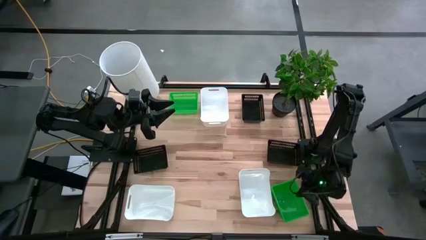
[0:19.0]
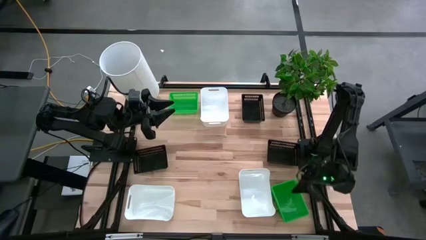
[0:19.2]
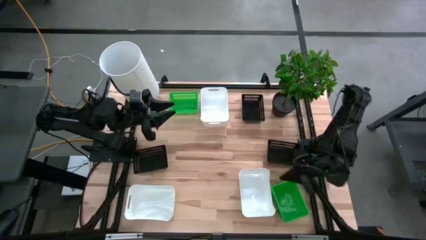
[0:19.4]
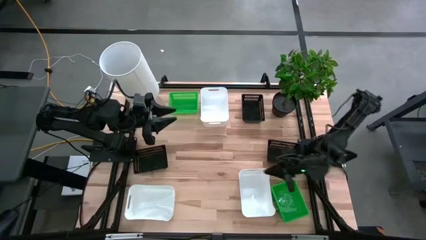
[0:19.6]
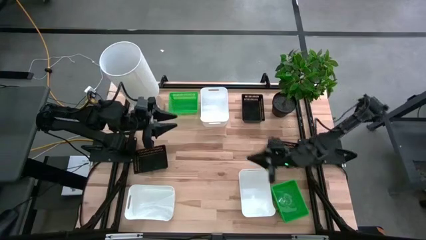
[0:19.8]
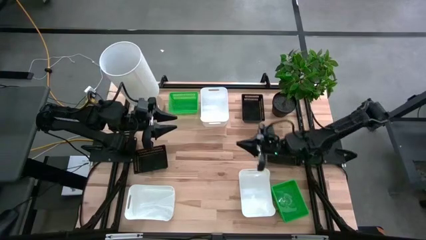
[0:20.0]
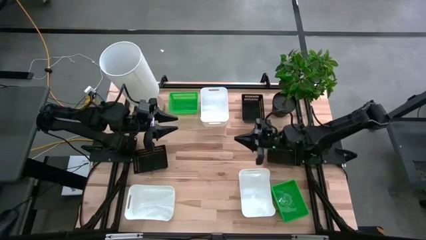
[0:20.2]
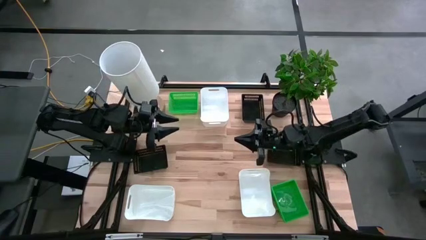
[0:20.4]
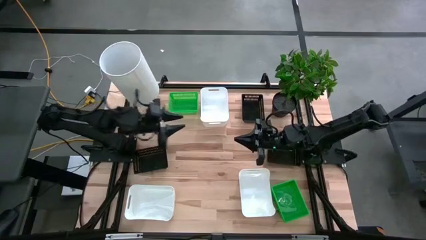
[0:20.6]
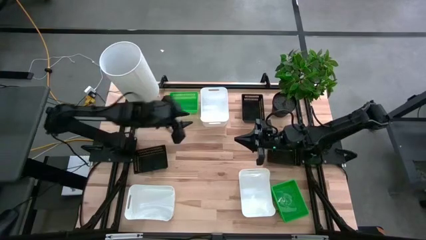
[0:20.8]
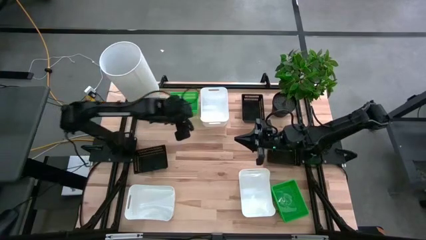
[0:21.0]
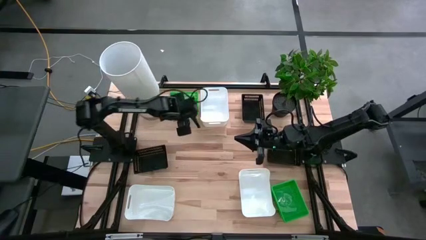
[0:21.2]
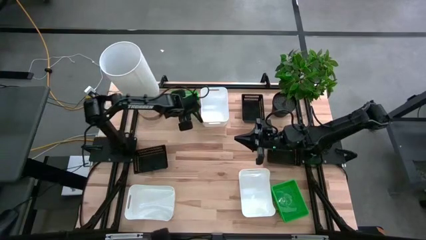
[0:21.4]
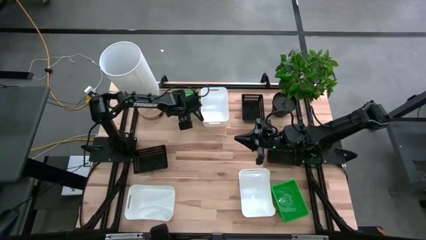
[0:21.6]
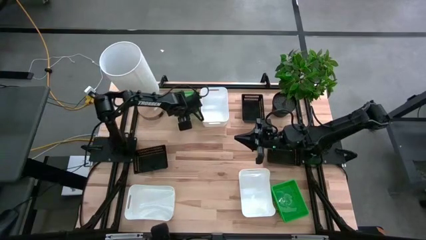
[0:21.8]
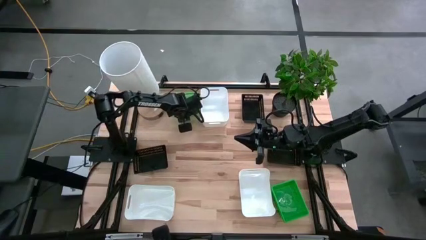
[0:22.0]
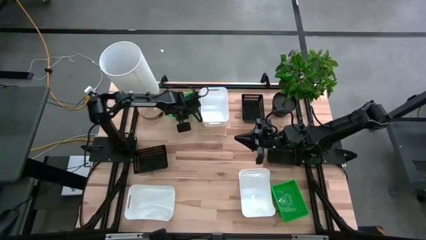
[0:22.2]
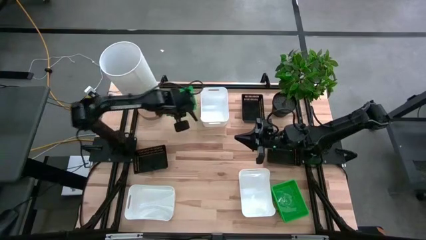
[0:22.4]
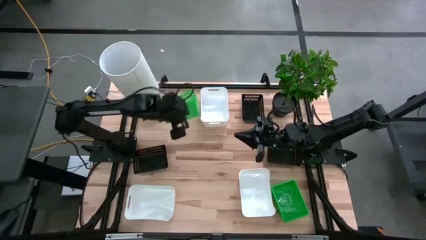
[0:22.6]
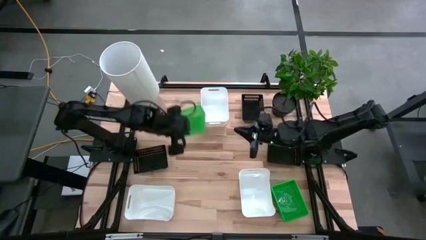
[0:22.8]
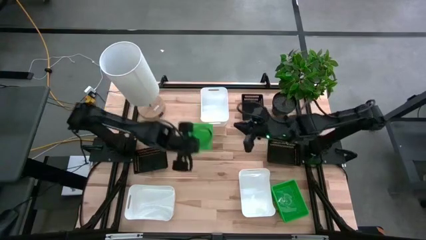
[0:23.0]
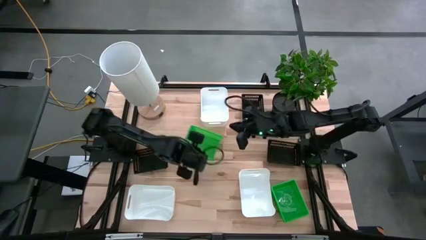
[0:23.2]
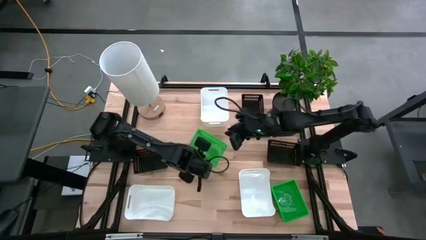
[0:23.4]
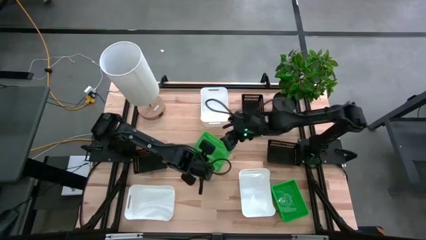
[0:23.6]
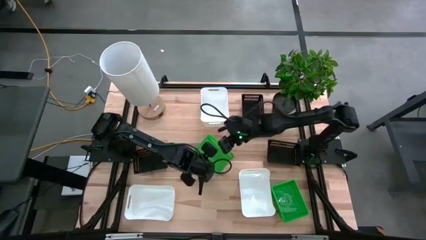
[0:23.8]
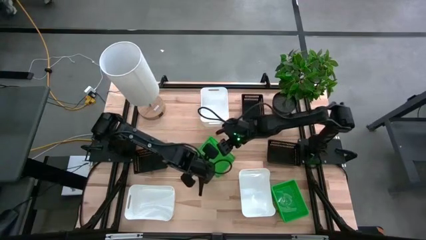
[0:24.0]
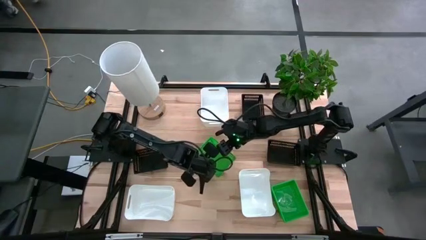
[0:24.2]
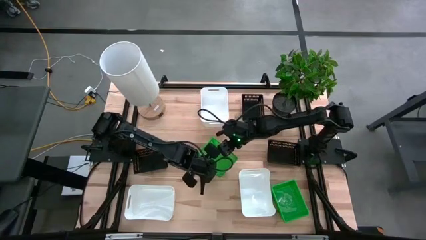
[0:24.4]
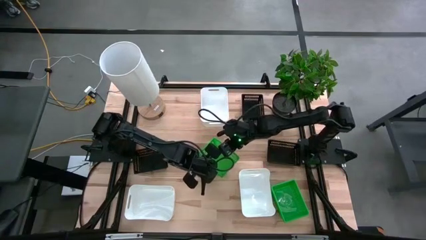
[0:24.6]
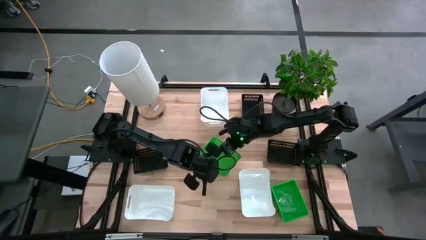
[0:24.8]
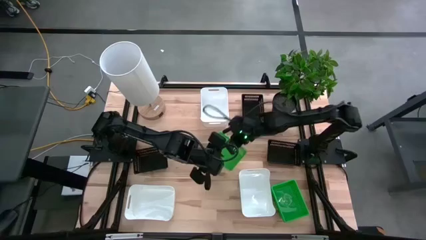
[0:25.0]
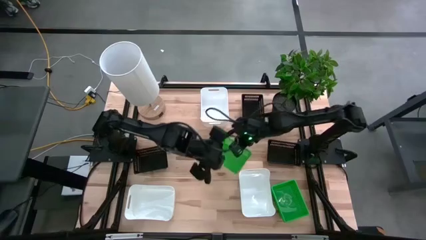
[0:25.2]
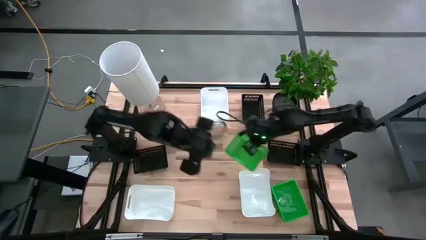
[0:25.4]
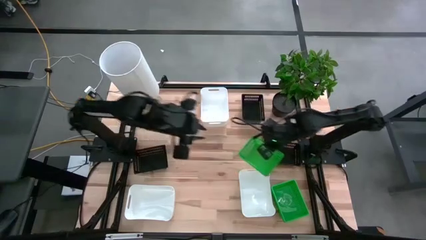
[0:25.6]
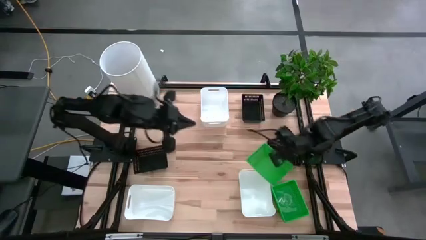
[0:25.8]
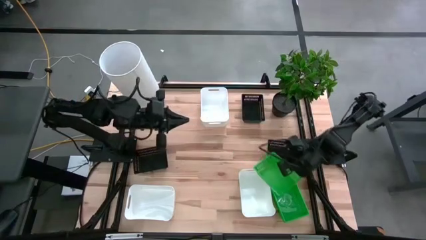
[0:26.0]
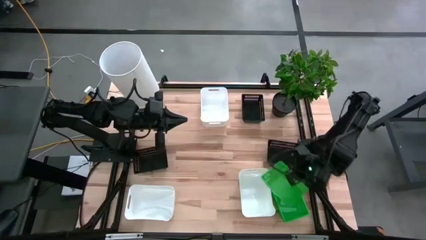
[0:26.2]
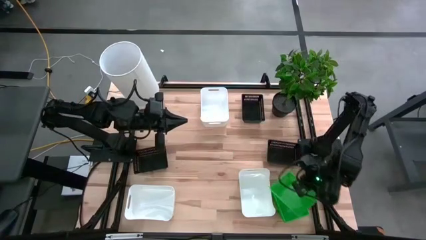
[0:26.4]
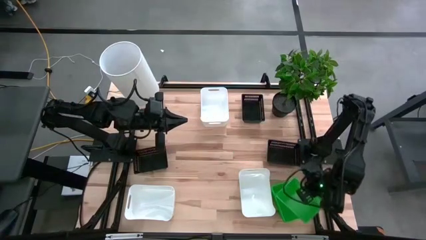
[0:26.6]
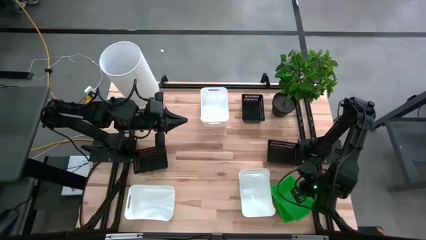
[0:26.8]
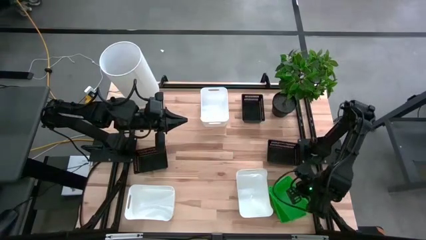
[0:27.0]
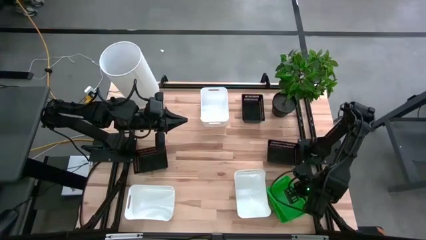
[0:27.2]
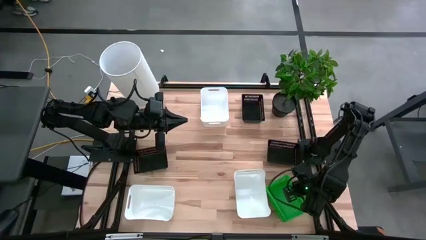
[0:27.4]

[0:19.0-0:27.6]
Stack the top green bin on top of the bottom green bins

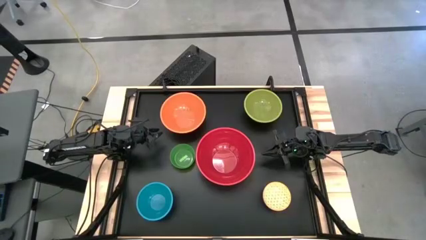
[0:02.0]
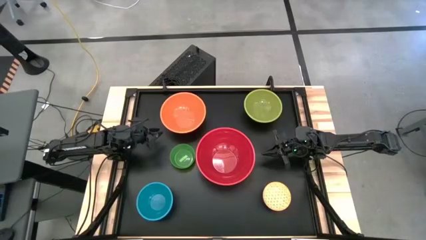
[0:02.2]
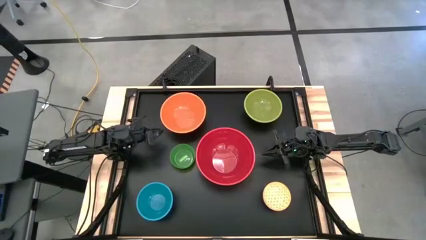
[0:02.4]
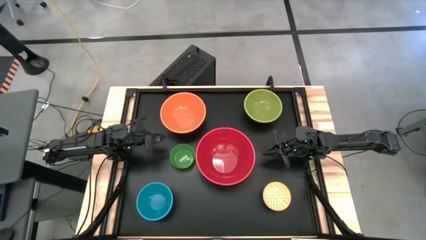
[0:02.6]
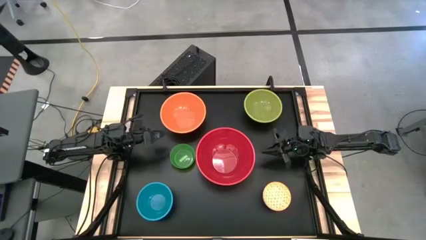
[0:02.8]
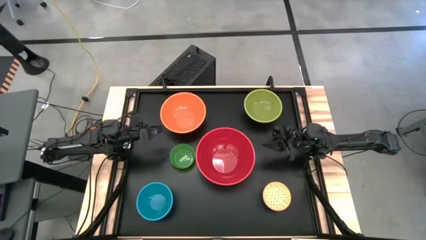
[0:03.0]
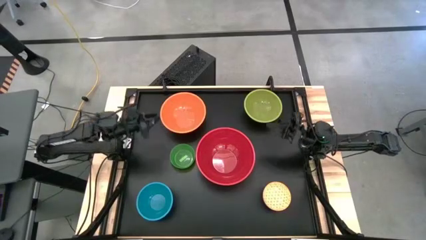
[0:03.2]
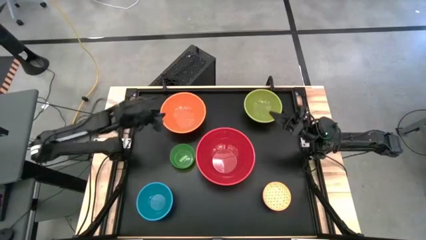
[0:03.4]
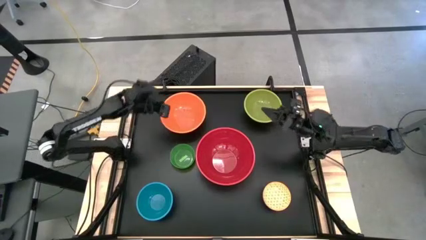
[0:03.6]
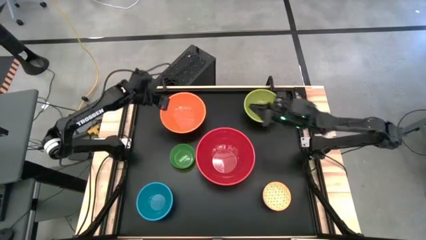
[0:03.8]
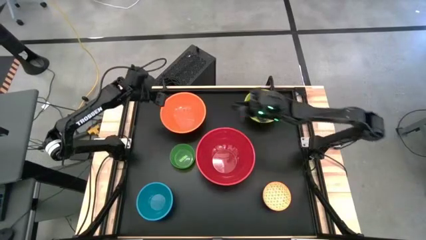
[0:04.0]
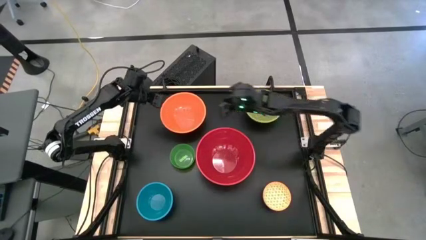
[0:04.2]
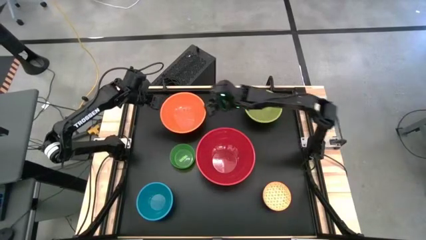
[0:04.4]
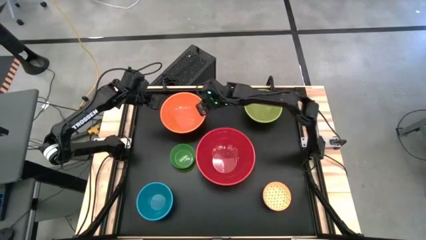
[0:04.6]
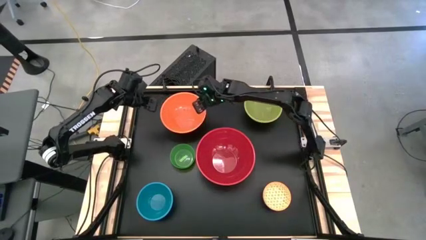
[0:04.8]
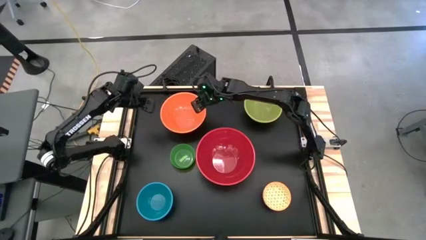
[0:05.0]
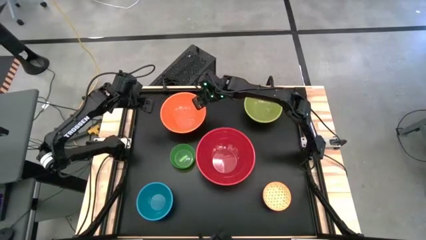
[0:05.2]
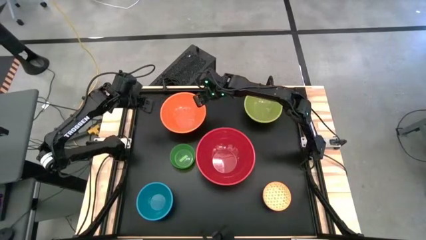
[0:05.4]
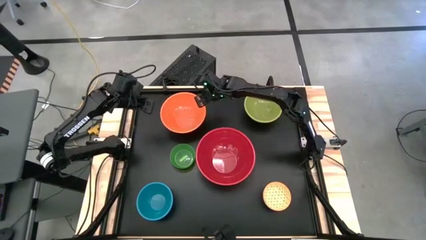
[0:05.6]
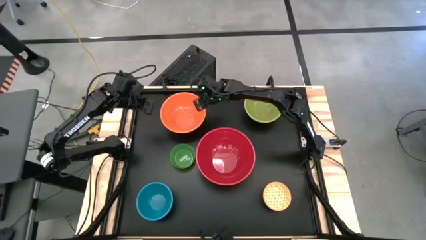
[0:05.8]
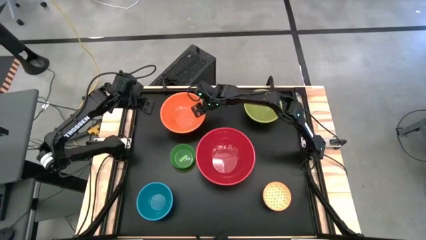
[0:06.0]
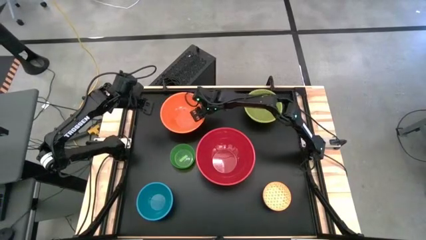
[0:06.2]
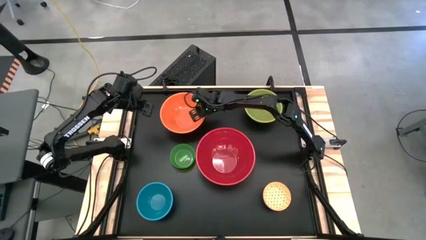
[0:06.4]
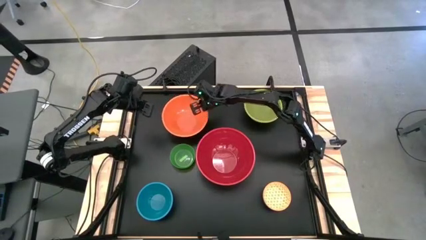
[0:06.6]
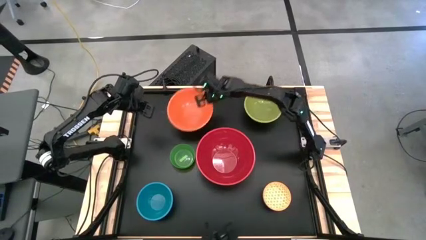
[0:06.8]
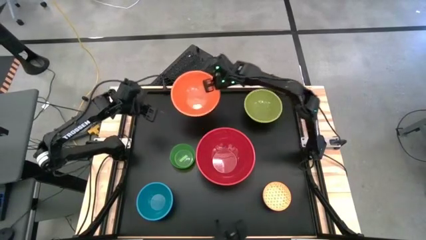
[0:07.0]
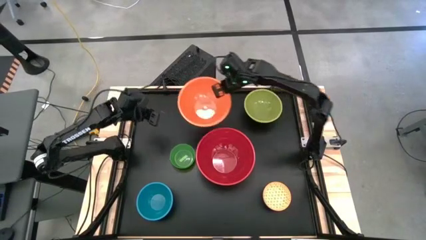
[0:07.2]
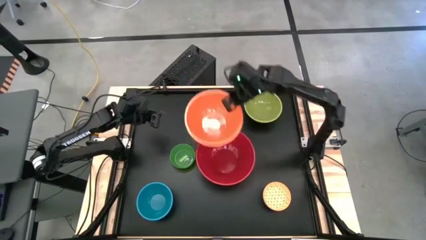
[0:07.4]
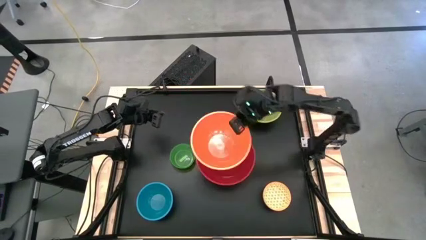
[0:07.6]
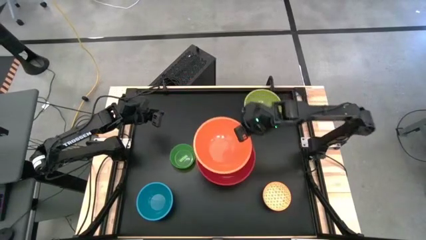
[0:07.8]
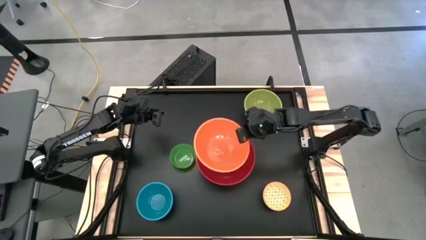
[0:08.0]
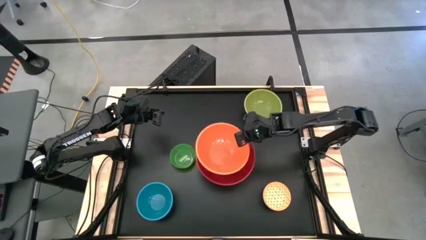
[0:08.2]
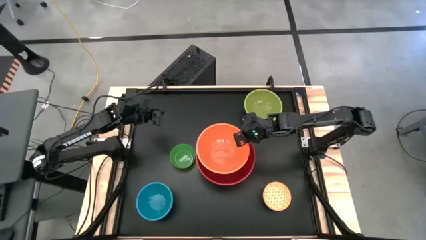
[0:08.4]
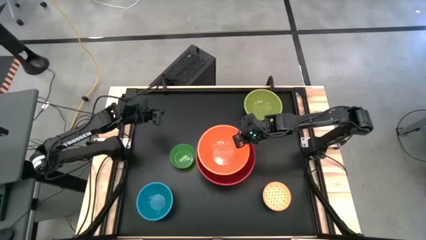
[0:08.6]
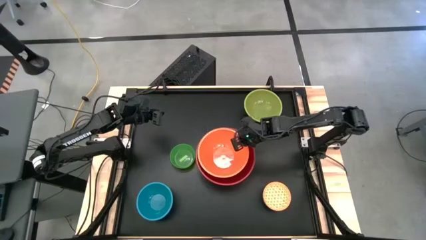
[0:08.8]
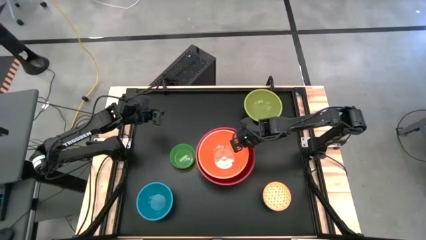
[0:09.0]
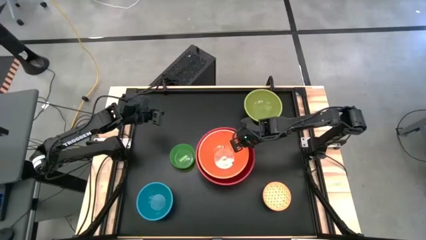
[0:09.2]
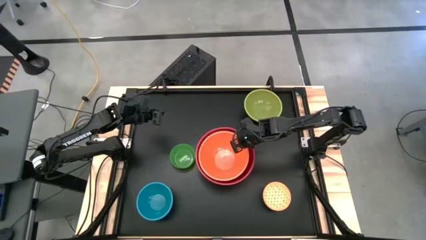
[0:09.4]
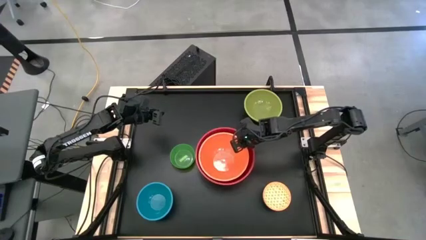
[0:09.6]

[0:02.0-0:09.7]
Stack the orange bowl on top of the red bowl
